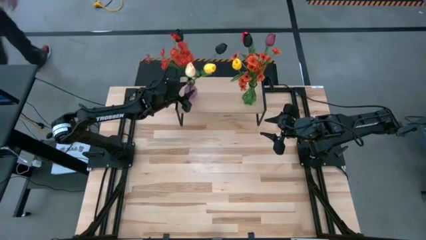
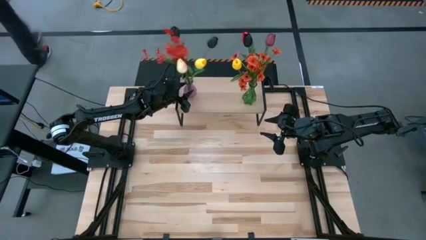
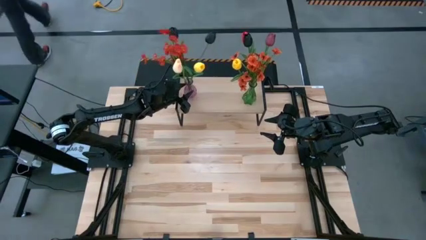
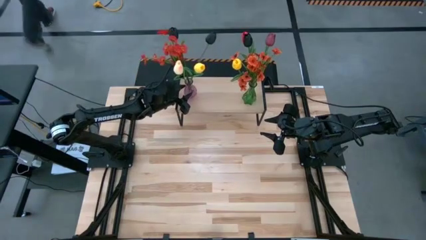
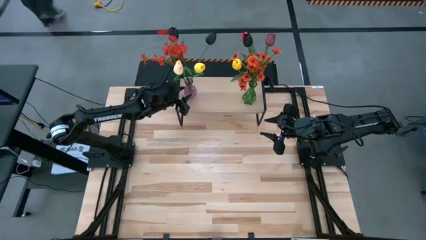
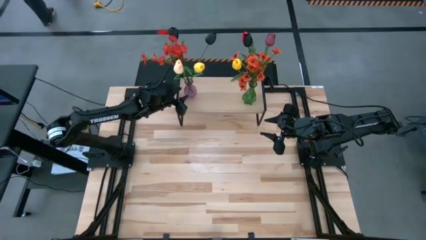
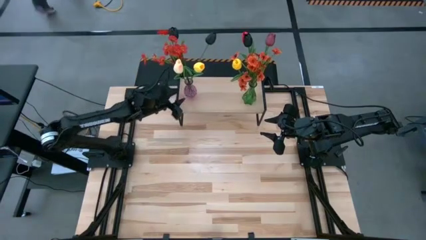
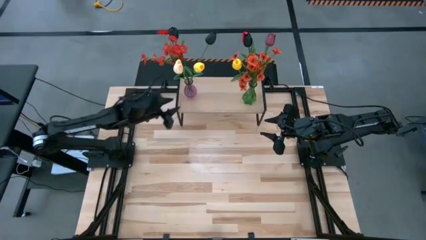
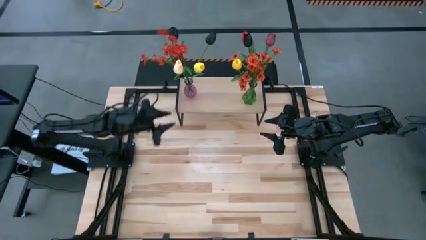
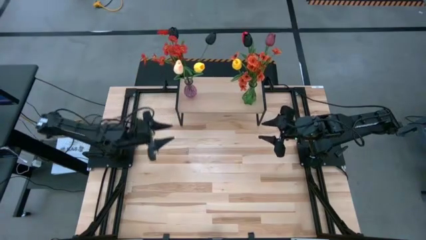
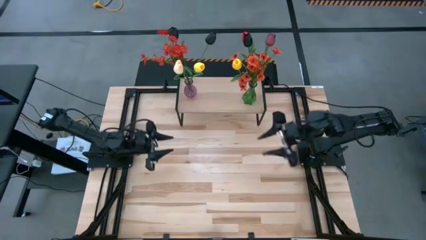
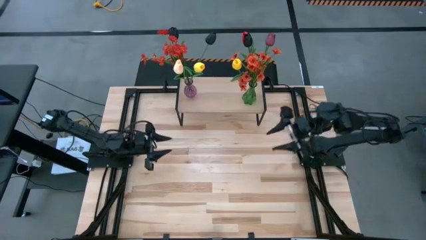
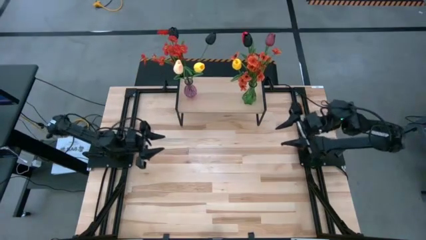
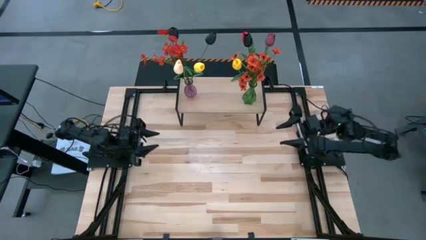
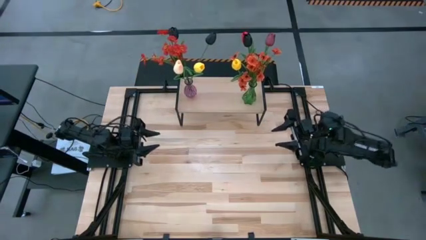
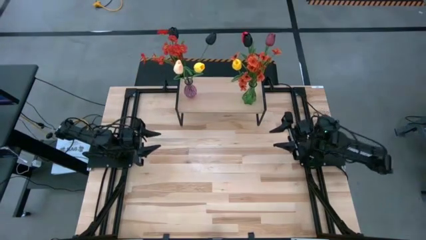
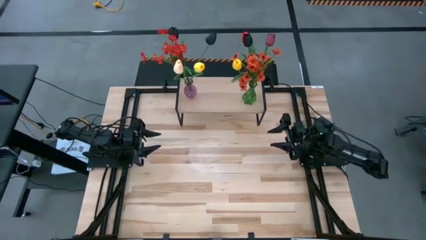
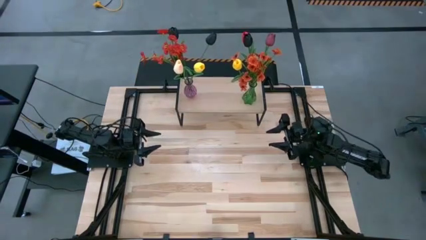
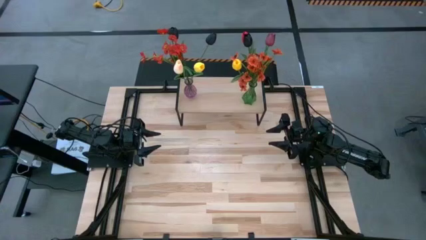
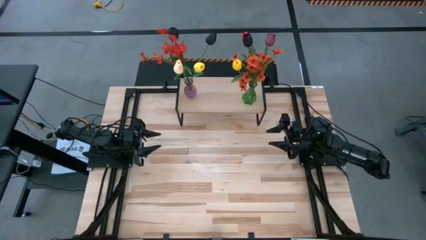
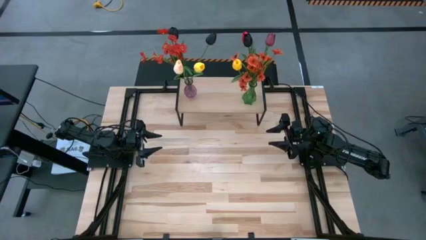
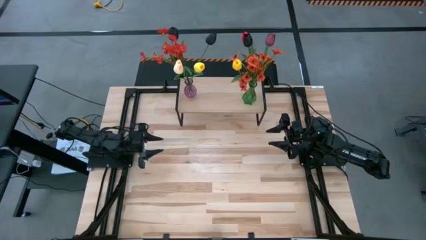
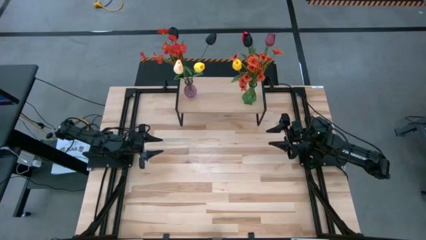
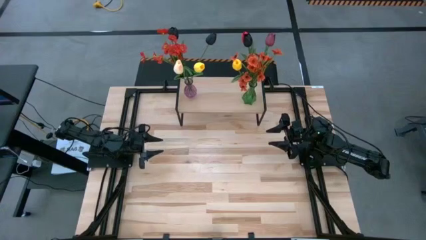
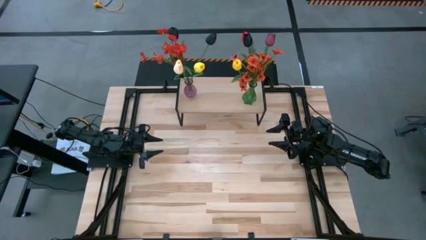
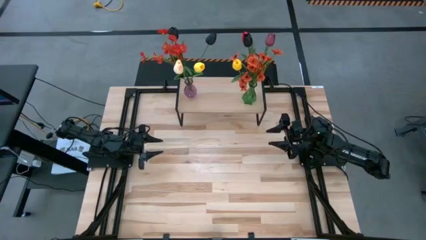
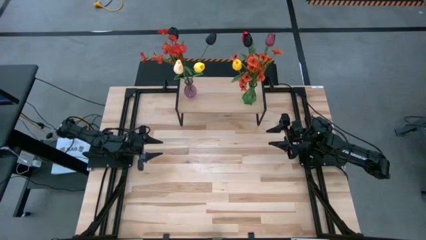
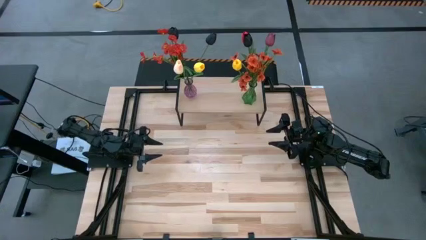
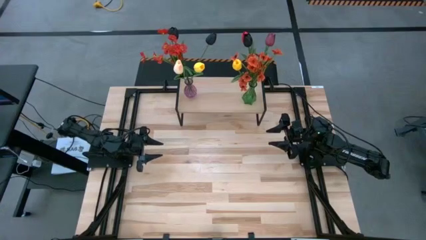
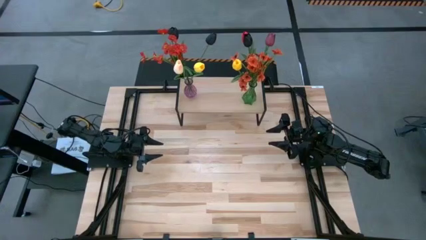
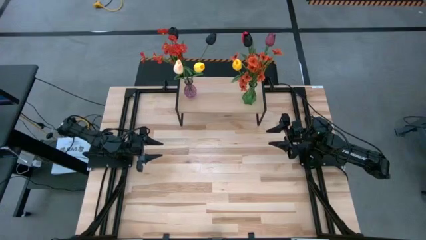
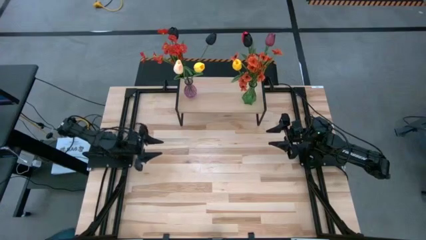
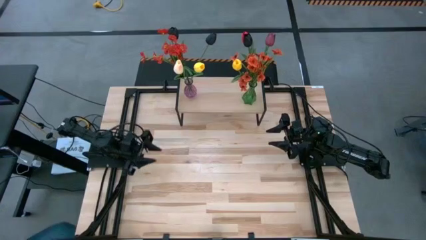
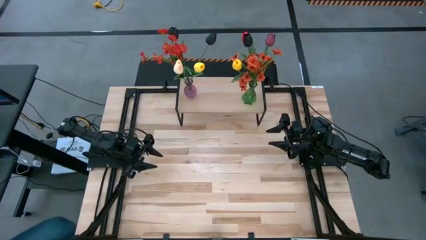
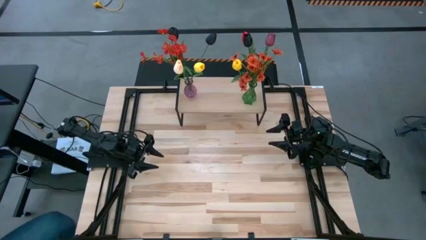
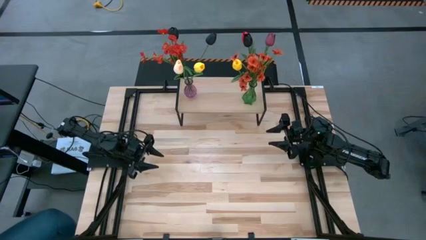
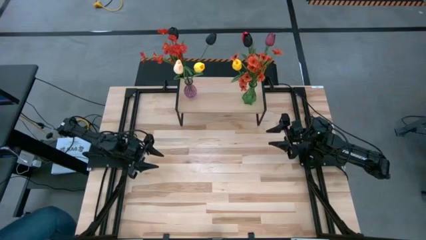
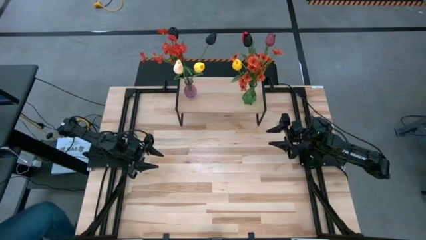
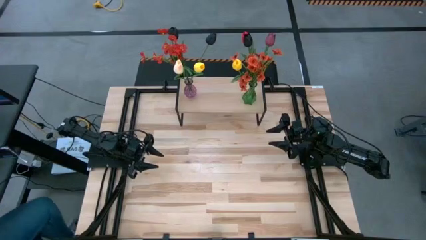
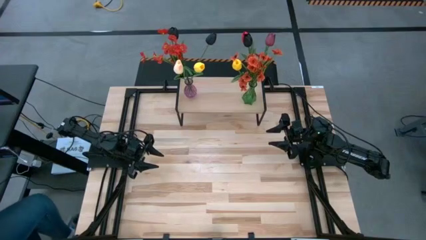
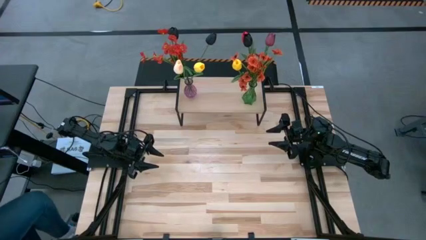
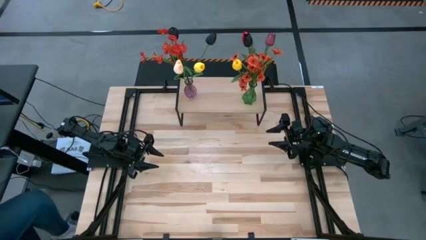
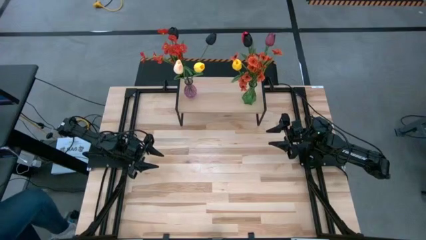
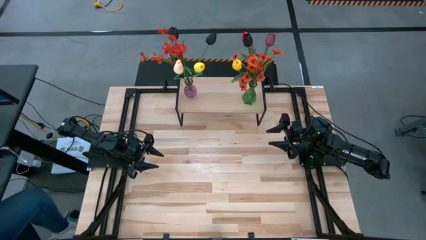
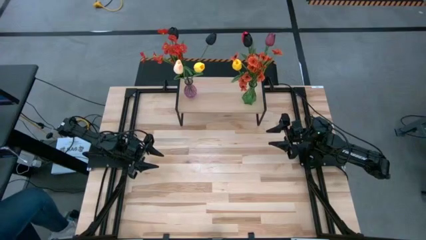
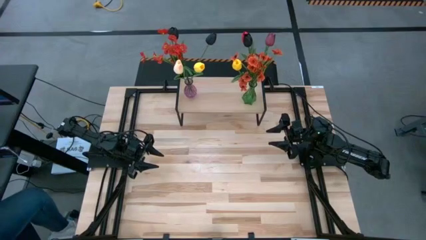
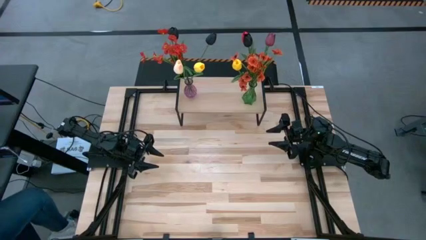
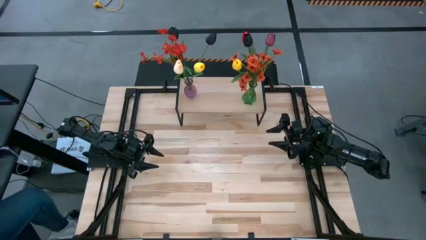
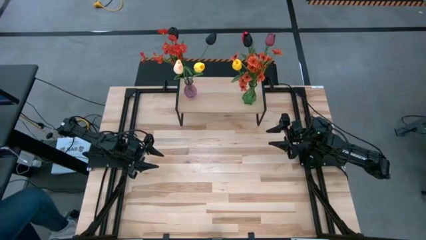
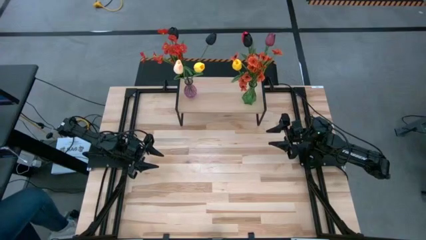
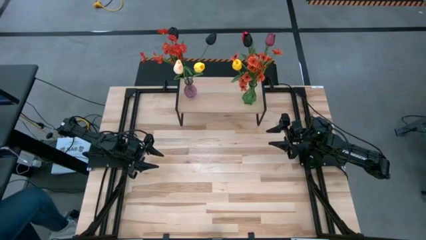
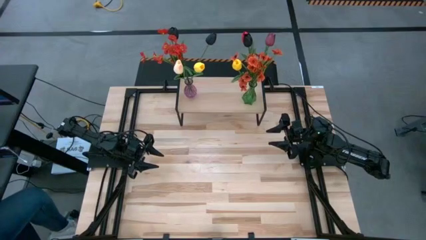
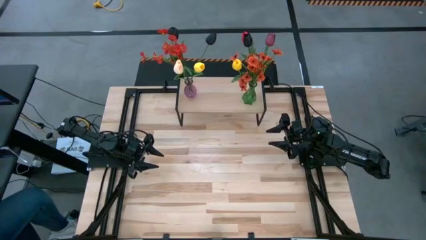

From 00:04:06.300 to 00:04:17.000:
Task: Pick and place flowers into a vace then onto a shelf
Return to Home Position

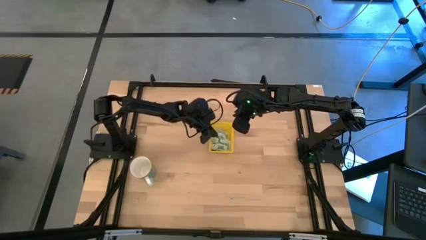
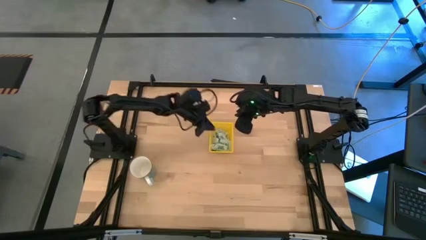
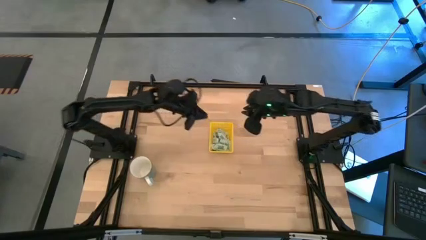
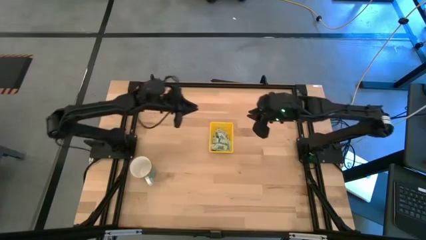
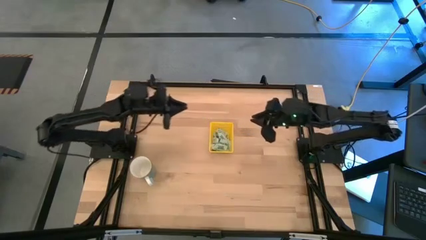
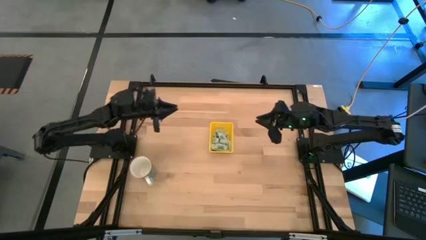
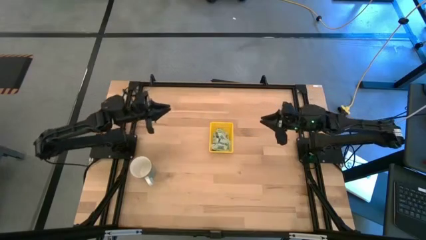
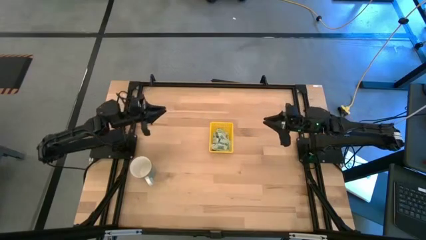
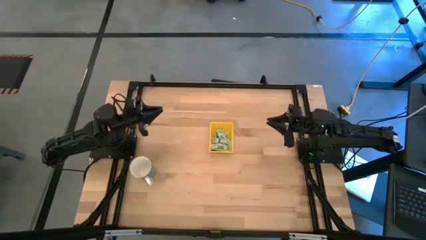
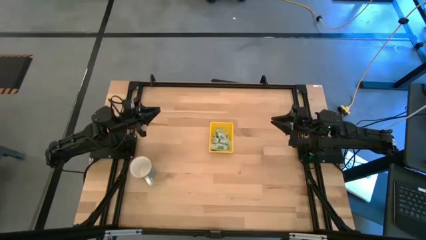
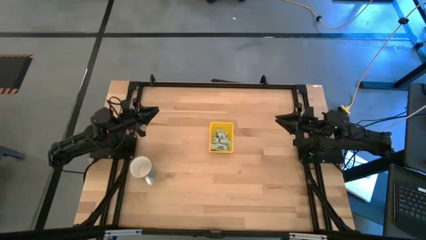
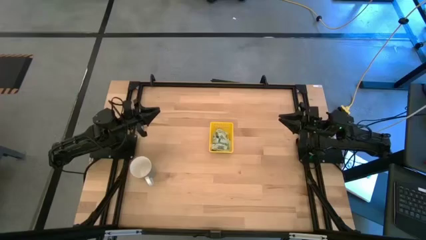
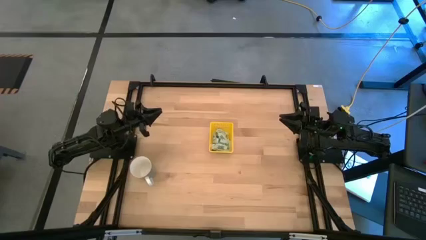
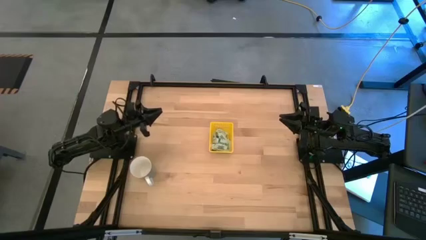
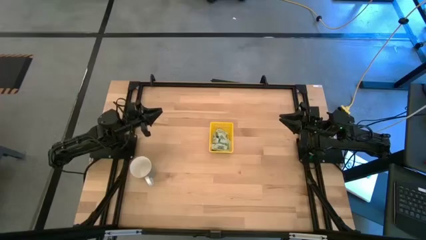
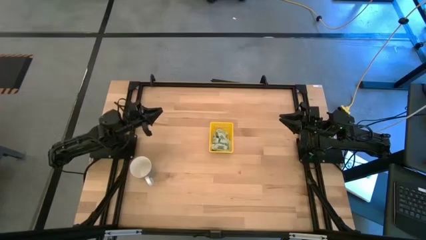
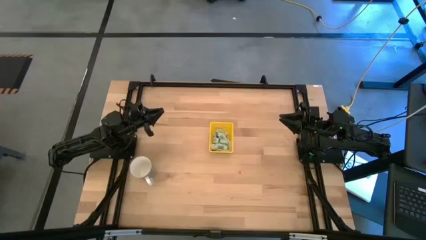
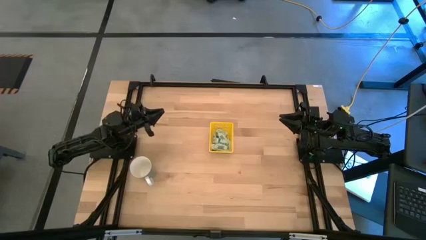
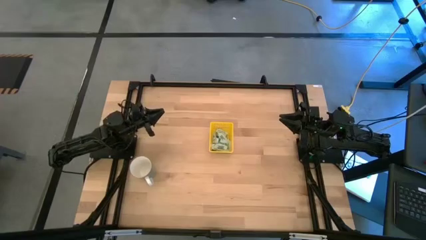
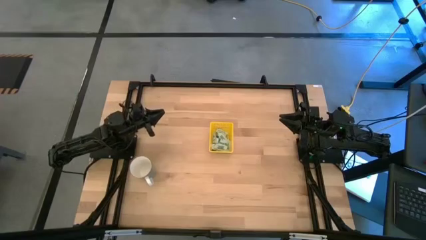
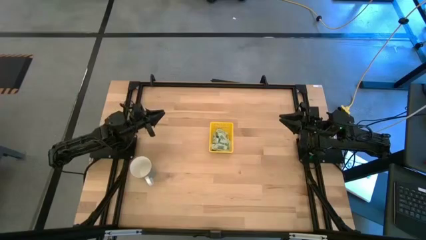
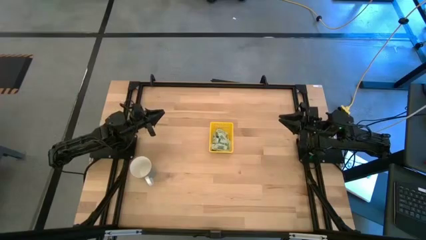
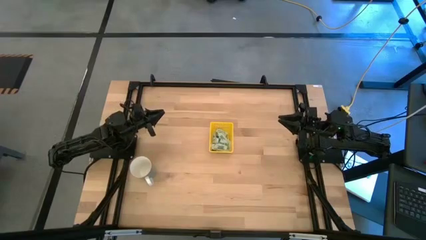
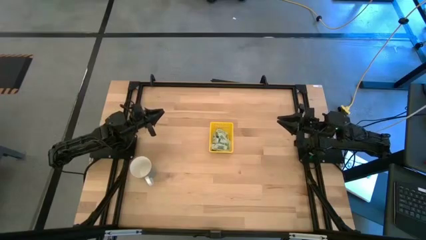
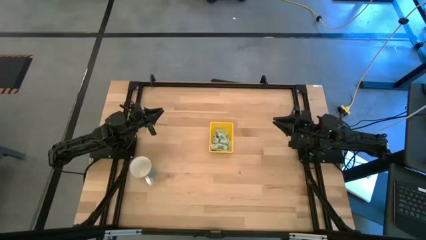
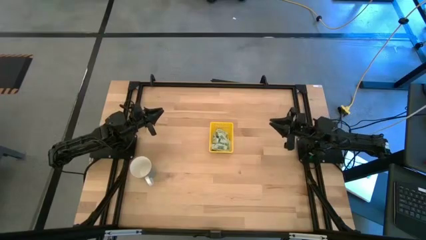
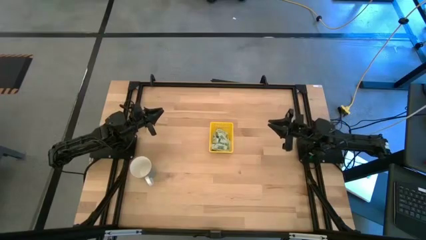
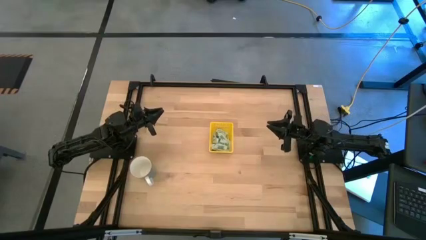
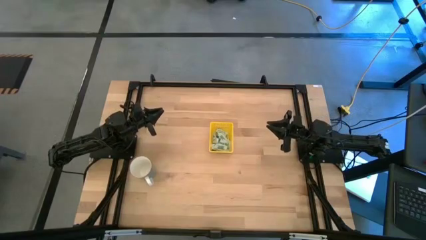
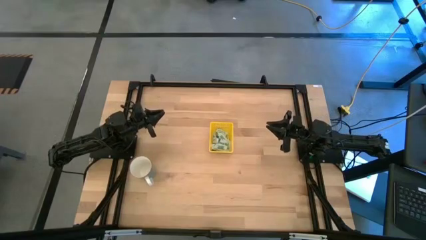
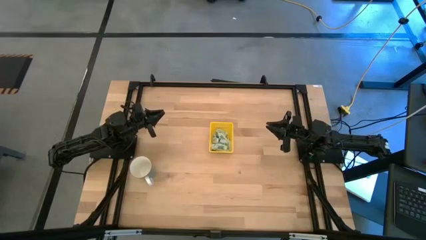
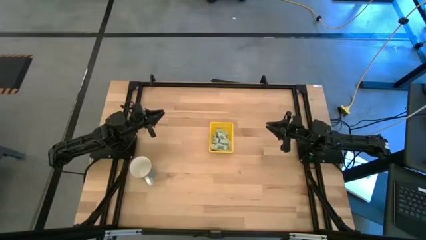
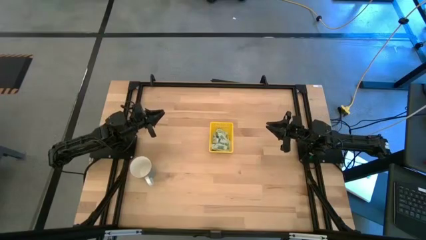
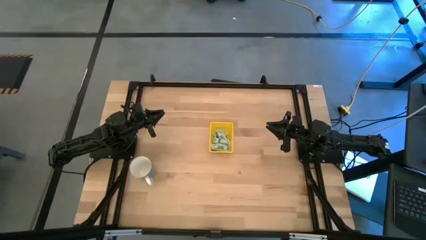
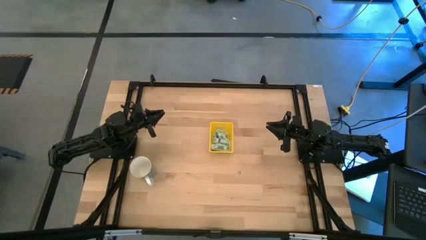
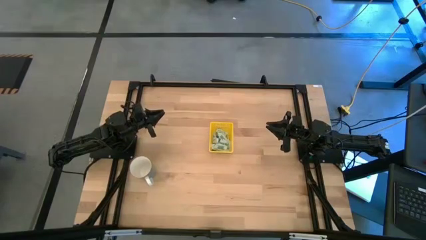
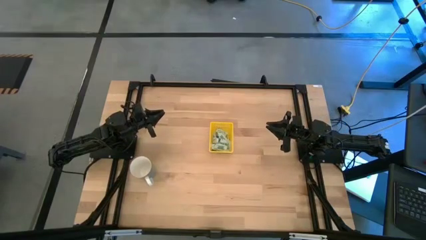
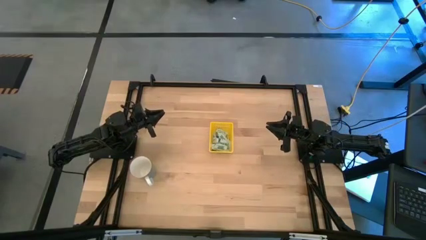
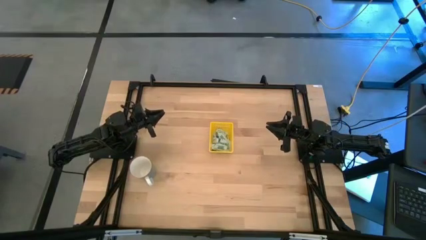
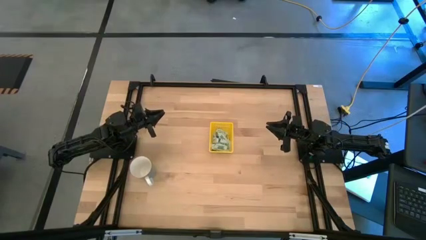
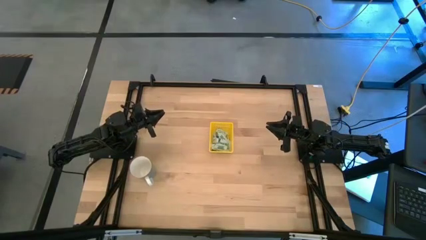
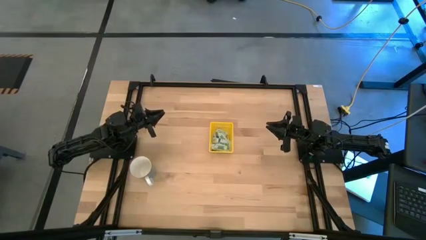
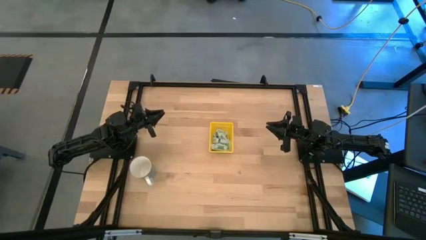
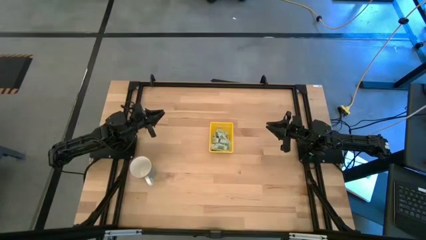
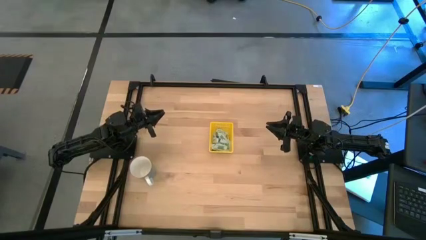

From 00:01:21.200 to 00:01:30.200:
Task: Pick and place Stevia / Truvia into bins
Return to Home Position
